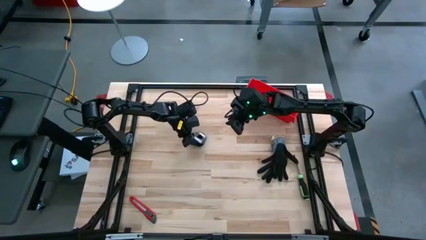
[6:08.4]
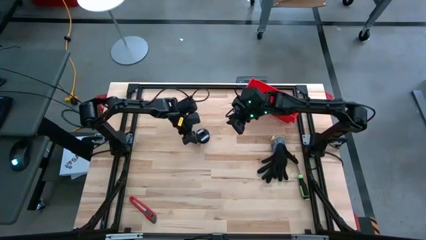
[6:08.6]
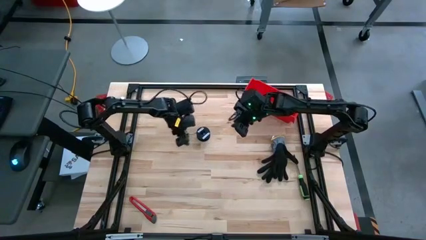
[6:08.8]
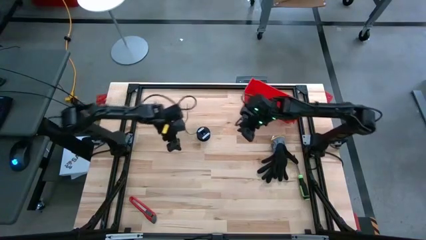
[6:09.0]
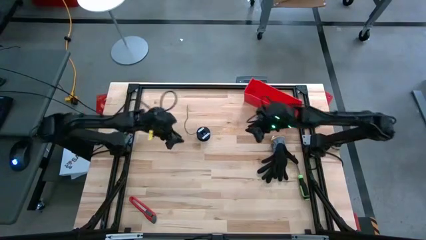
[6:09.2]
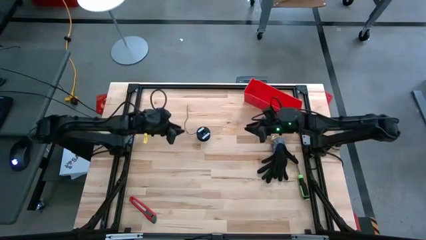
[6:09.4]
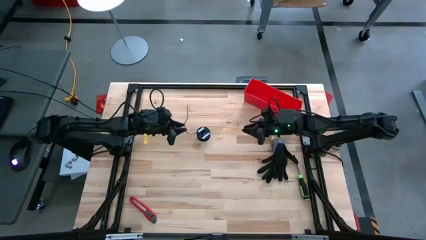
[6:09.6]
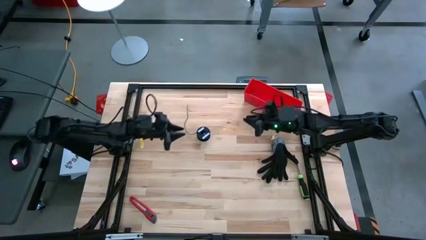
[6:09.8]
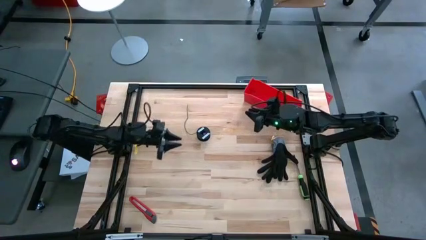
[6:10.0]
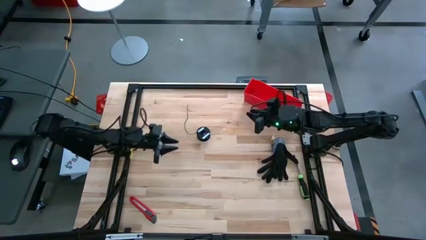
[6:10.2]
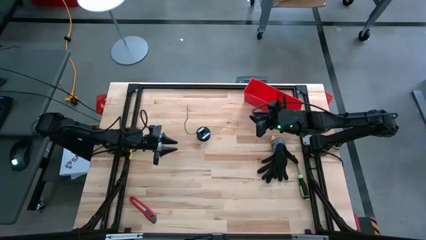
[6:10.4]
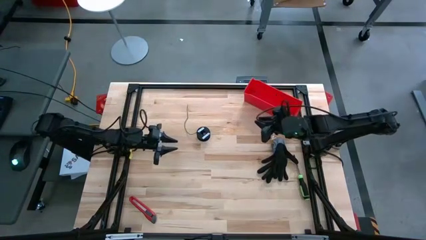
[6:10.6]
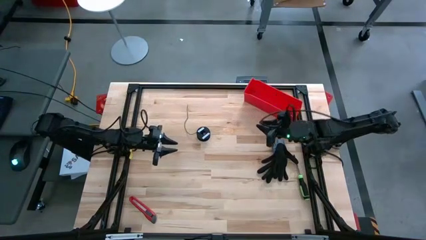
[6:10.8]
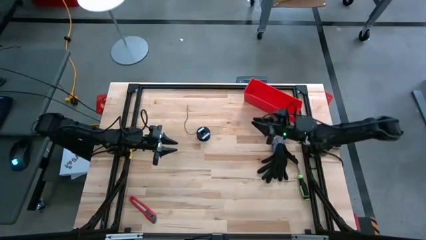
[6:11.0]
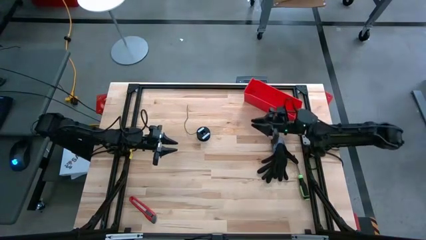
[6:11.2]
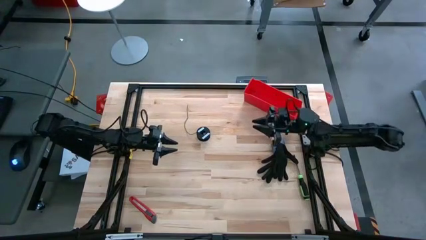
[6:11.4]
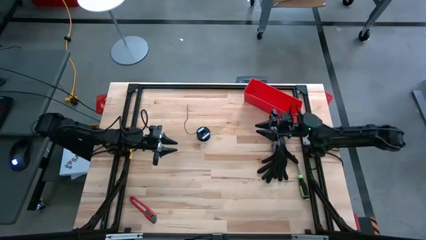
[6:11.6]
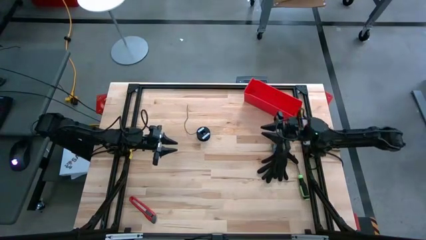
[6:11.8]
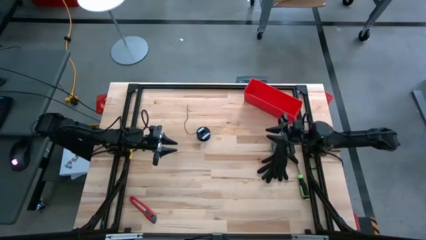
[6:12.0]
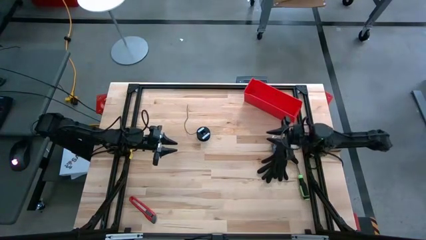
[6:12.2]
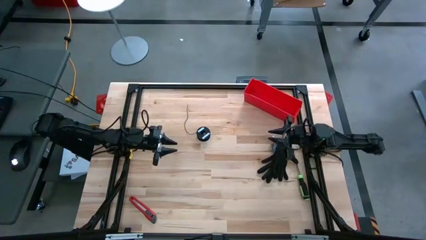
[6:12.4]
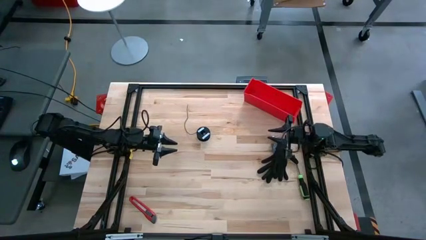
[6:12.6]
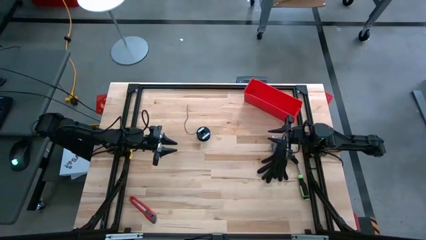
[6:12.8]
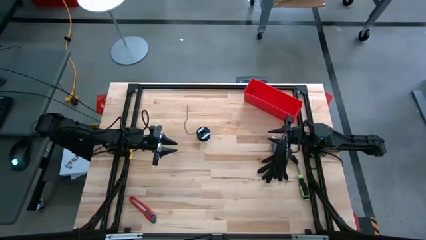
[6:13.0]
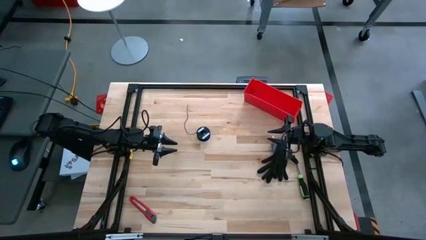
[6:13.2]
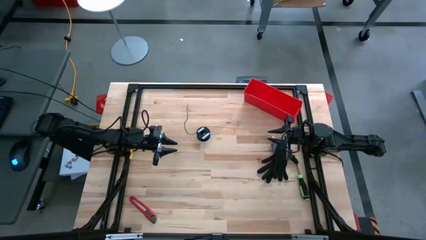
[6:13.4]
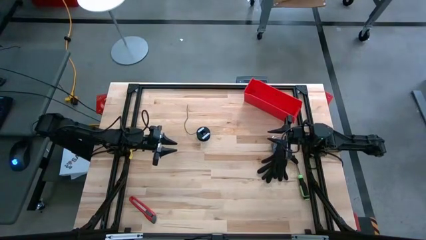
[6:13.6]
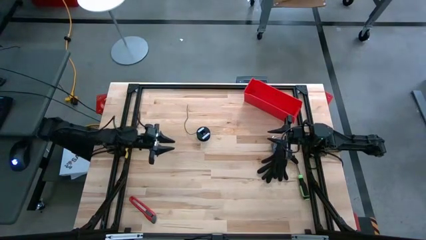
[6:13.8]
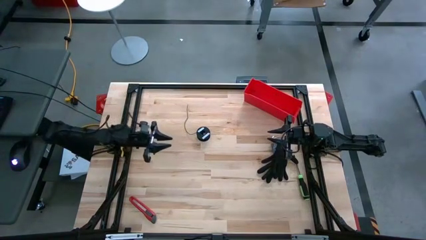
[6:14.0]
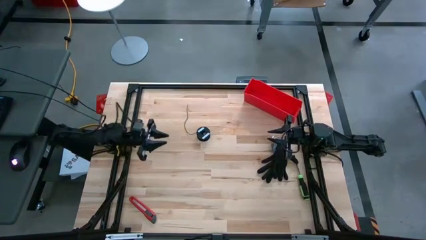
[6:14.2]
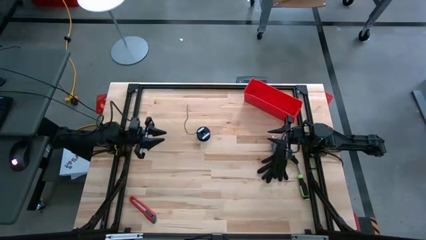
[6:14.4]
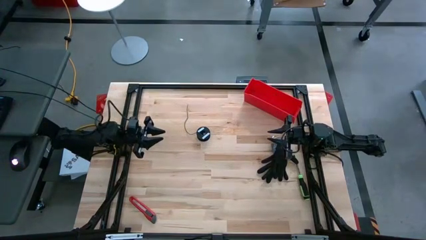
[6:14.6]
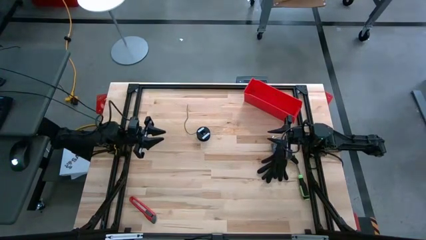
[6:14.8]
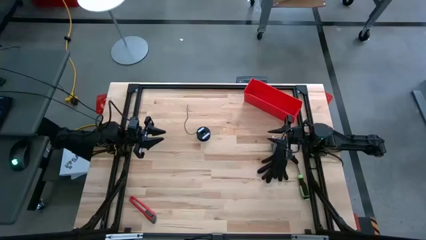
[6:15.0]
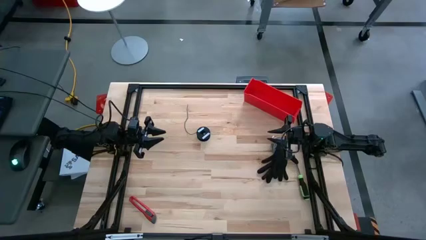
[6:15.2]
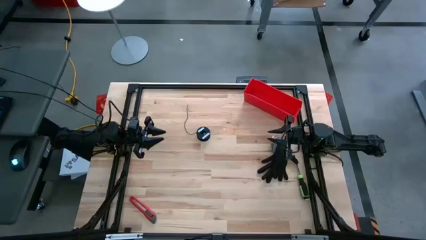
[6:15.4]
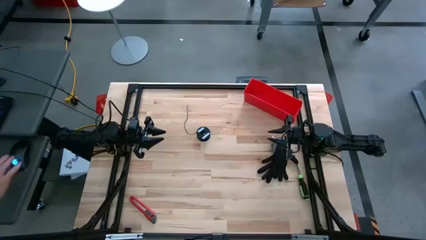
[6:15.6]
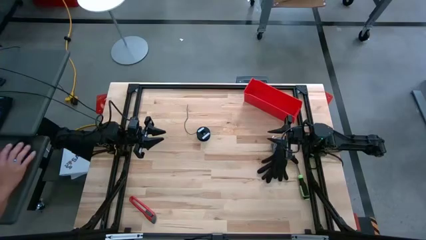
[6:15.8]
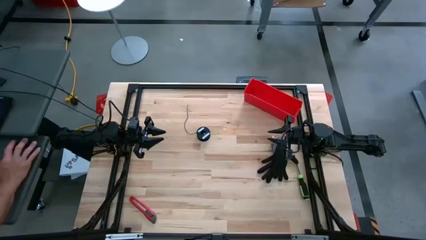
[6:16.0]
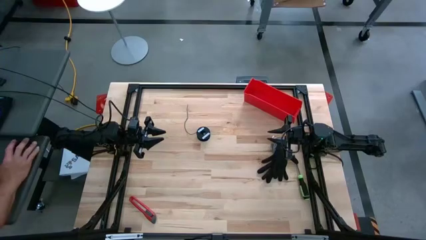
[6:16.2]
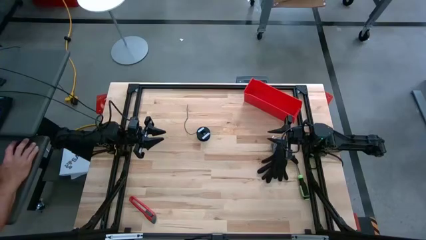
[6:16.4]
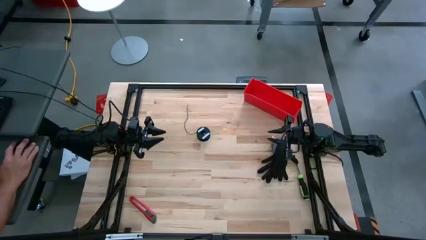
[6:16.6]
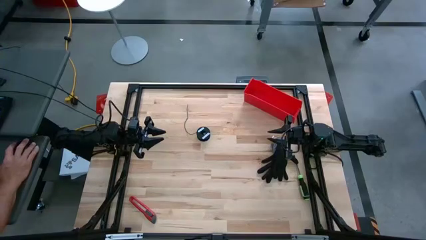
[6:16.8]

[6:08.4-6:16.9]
Task: Coil cords
Return to Home Position

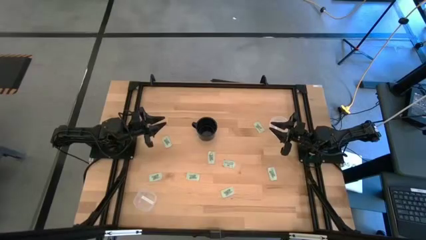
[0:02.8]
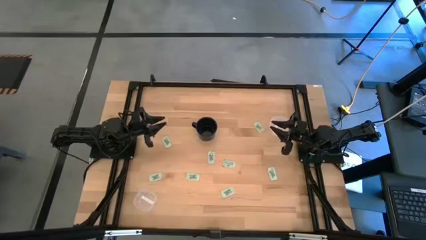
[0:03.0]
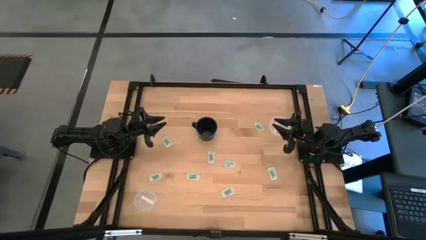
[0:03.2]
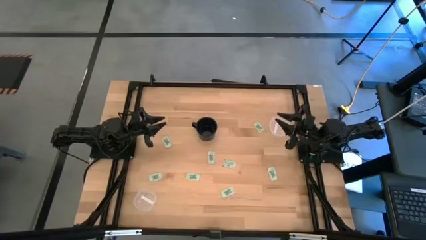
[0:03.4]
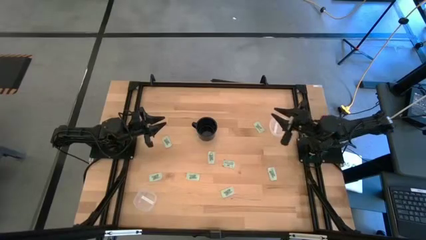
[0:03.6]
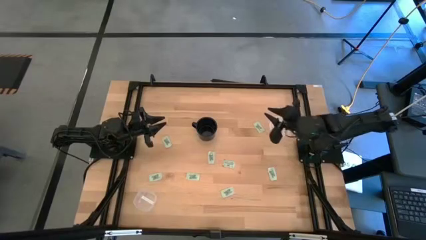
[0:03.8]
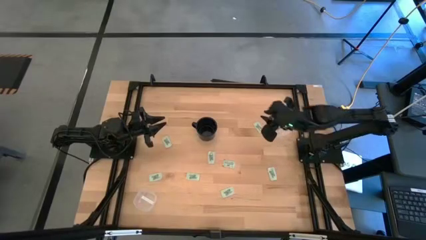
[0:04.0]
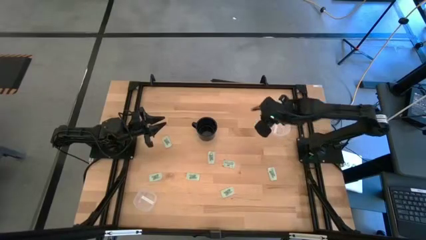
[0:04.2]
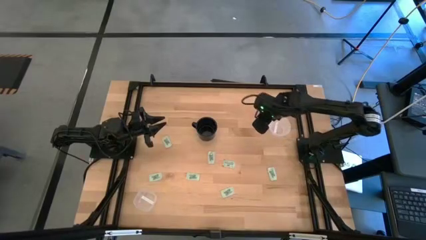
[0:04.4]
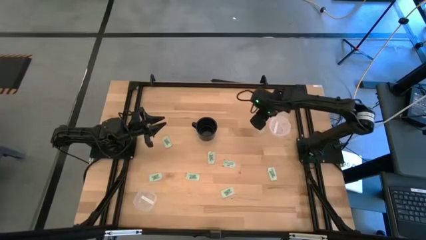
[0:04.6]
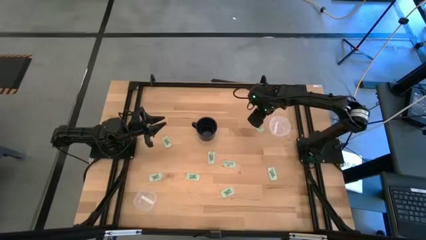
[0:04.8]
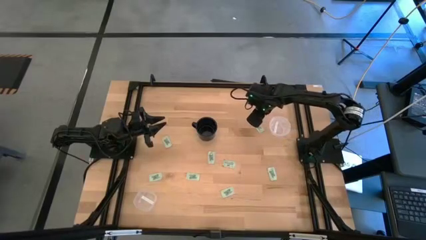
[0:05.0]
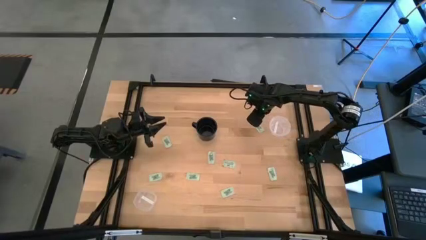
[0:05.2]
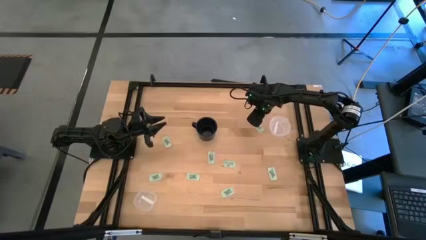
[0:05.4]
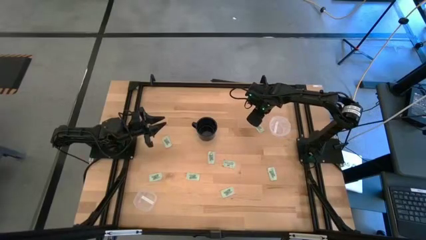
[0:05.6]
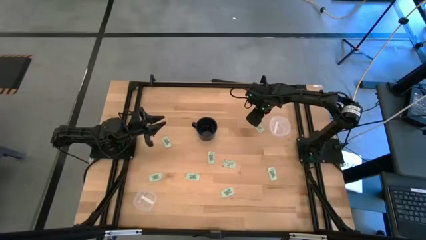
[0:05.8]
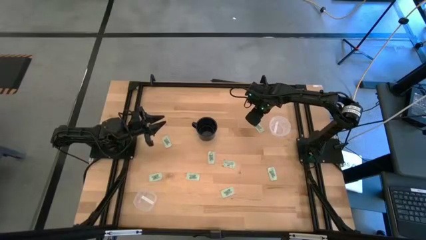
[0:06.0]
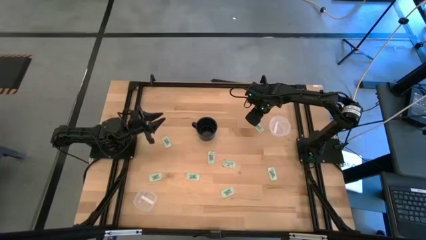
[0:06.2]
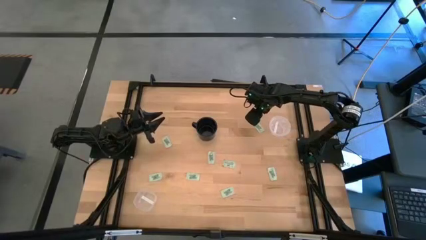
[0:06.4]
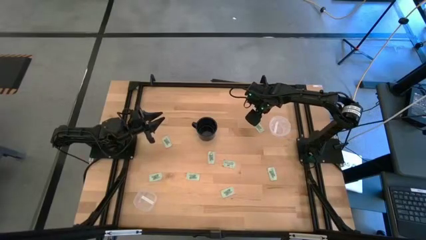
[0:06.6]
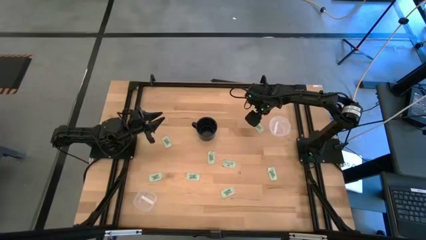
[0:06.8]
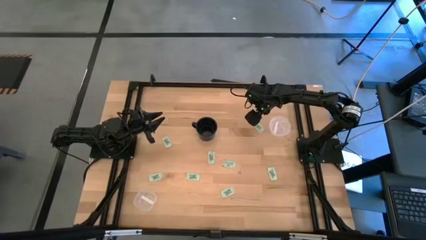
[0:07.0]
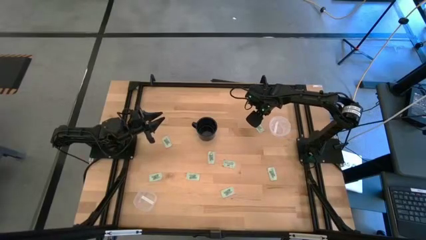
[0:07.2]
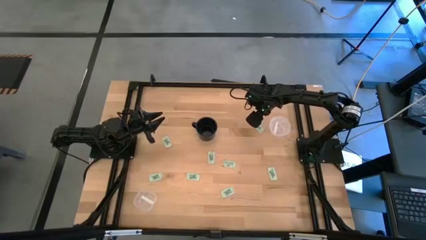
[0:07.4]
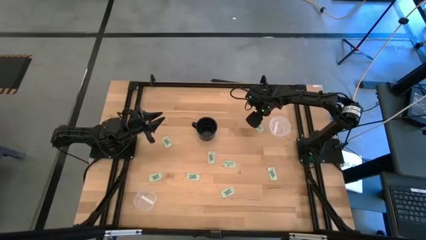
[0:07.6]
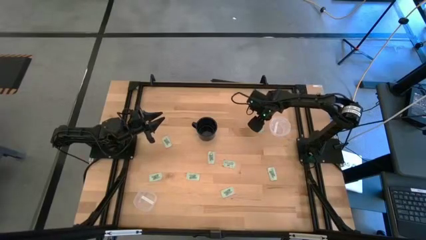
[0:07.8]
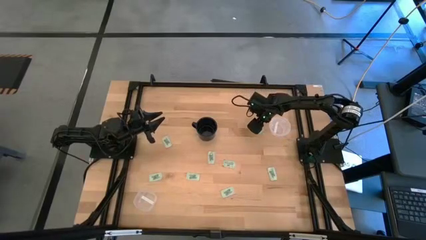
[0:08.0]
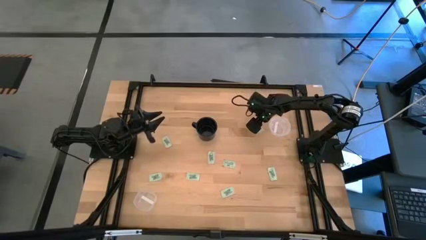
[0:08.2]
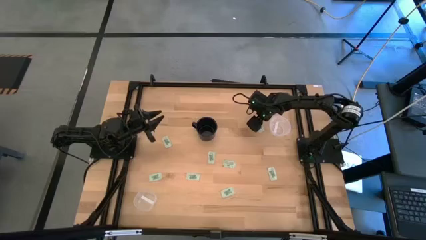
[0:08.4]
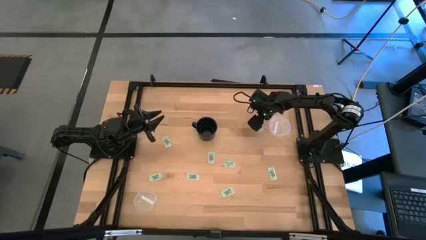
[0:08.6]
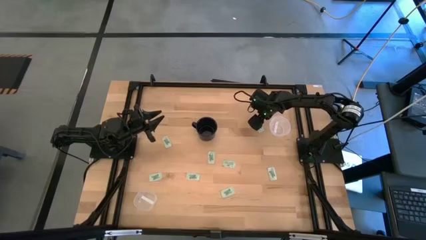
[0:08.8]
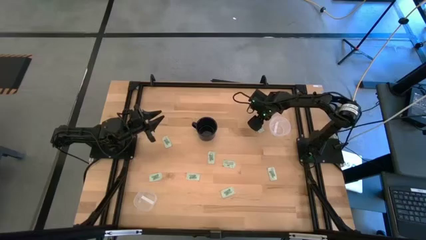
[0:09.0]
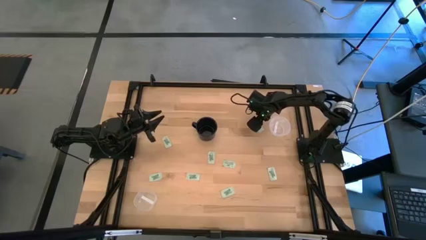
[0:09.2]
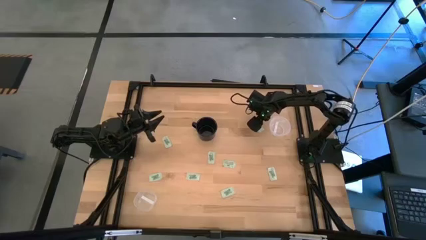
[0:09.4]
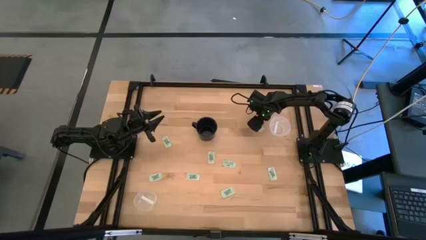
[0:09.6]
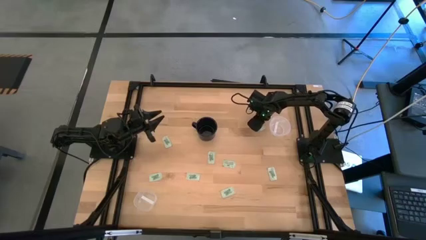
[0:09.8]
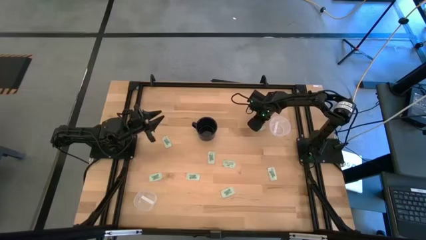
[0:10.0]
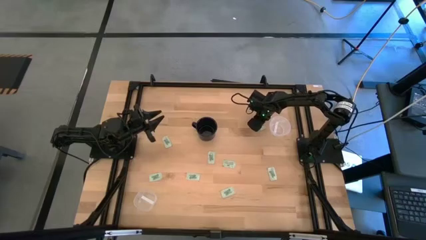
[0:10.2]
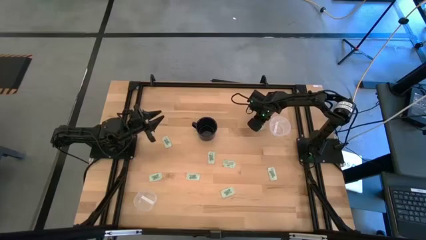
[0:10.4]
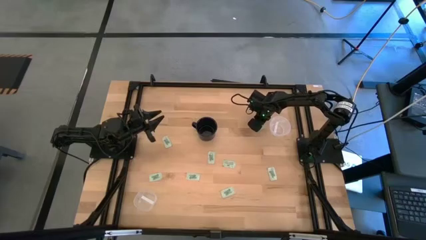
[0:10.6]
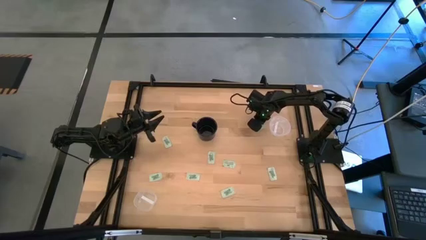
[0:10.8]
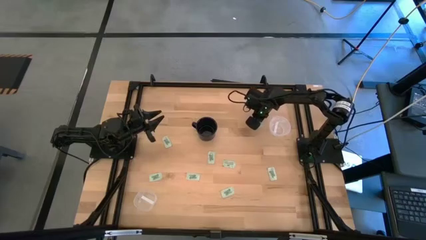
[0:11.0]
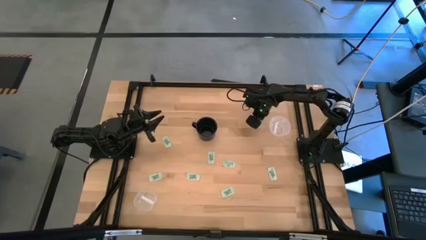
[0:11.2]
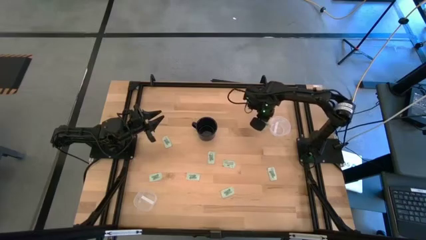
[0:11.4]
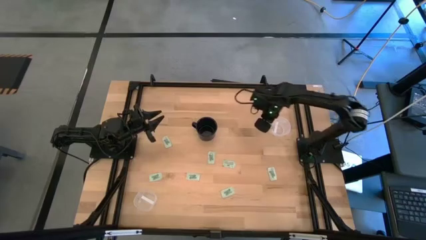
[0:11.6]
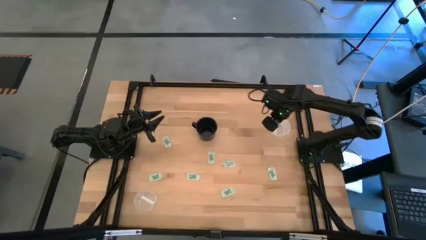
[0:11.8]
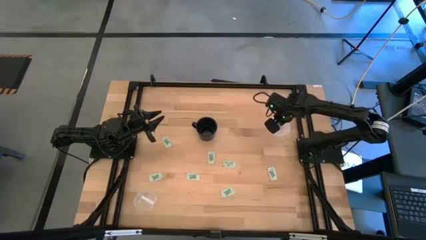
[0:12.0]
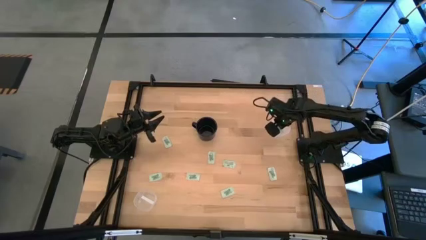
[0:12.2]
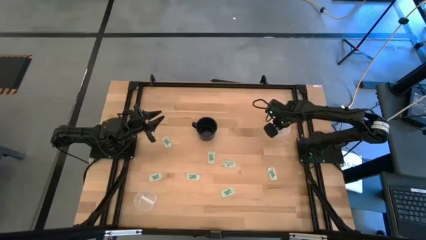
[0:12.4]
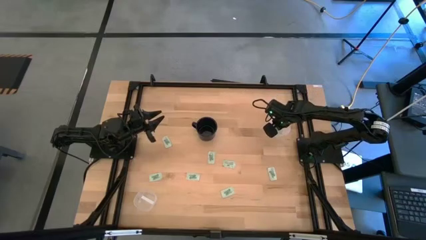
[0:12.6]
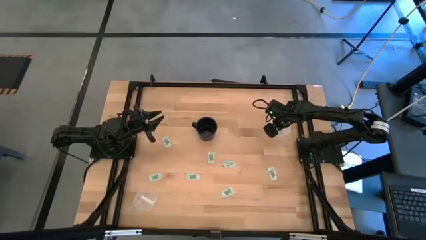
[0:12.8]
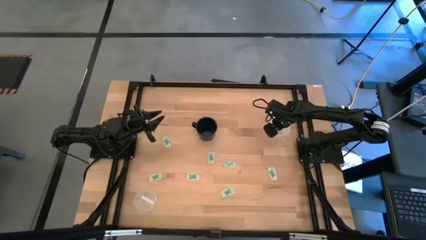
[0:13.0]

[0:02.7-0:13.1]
Task: Pick and place Stevia / Truvia into bins
Put the stevia packet into the round transparent container
